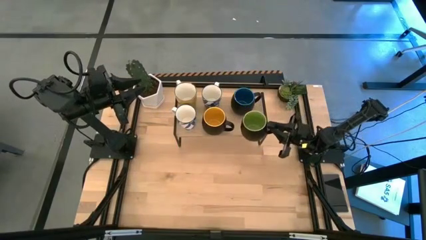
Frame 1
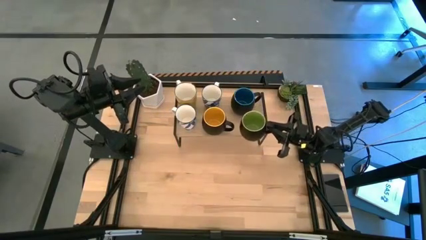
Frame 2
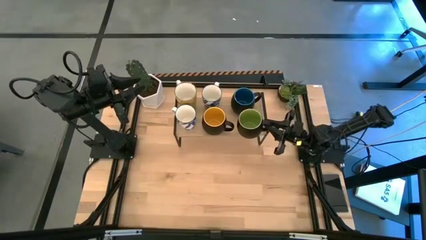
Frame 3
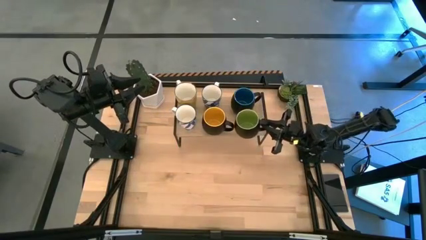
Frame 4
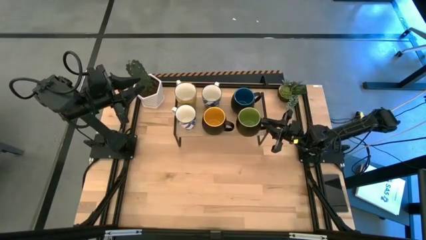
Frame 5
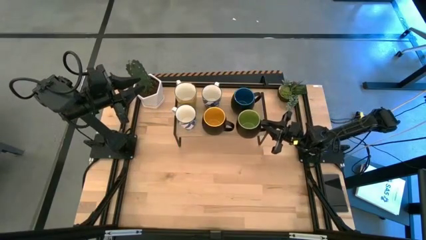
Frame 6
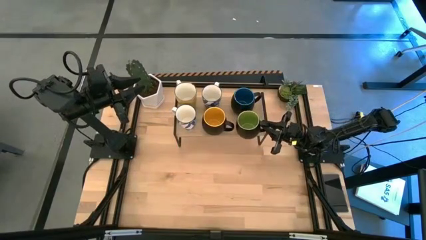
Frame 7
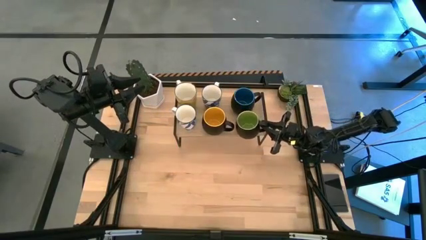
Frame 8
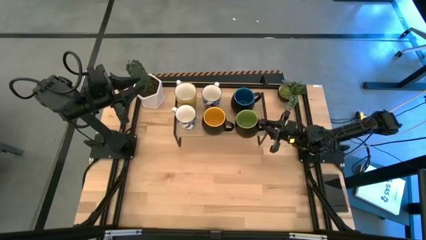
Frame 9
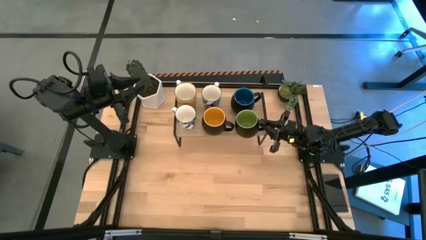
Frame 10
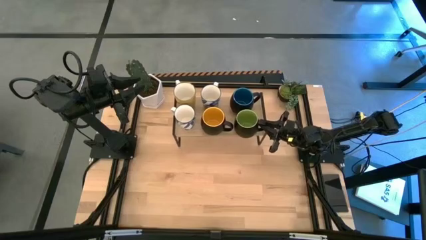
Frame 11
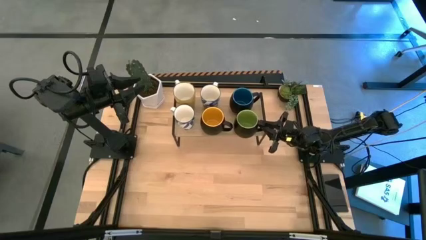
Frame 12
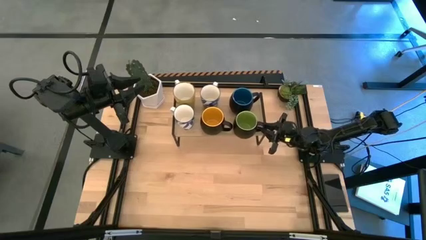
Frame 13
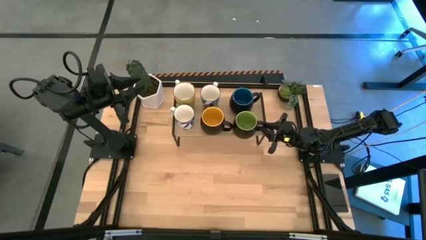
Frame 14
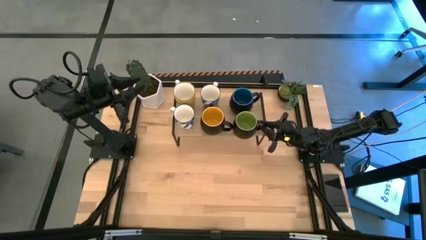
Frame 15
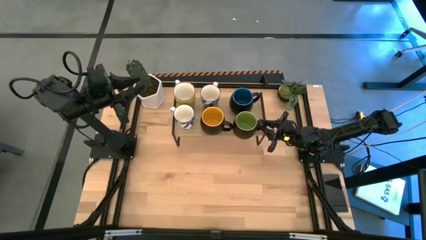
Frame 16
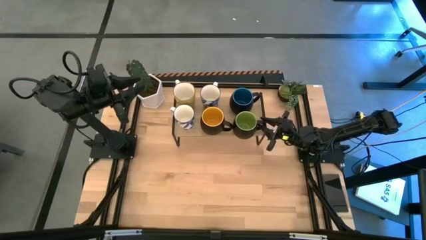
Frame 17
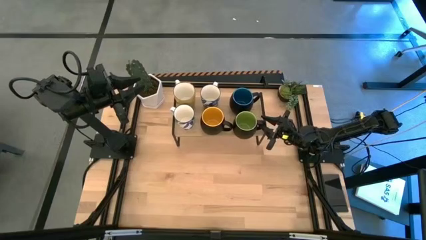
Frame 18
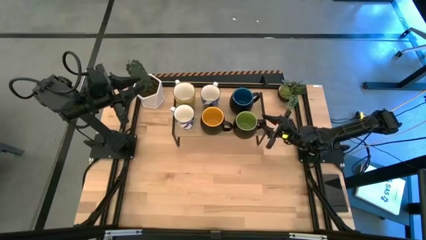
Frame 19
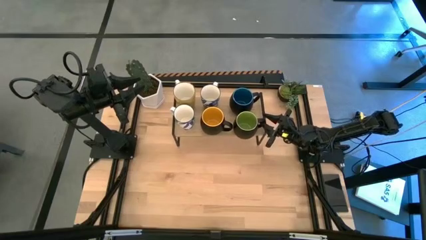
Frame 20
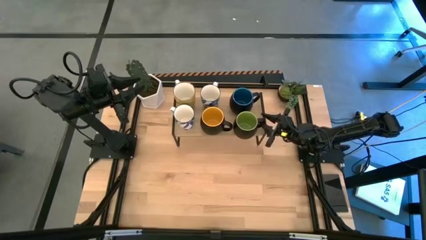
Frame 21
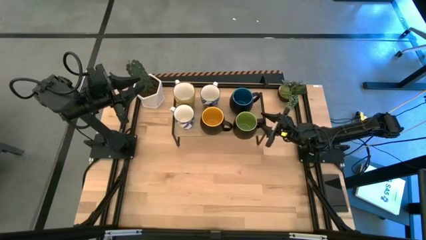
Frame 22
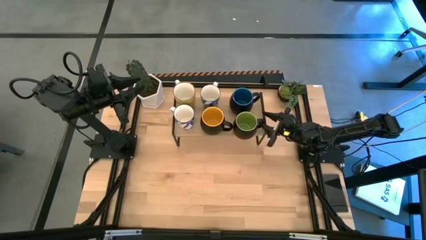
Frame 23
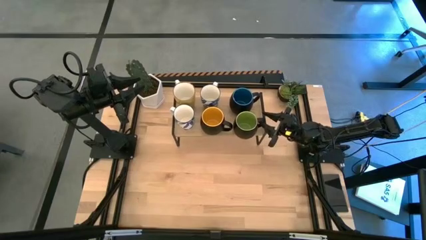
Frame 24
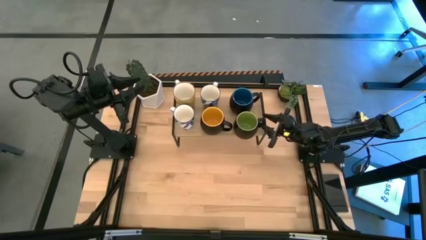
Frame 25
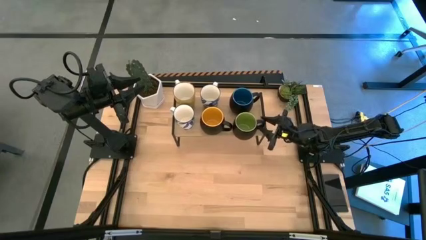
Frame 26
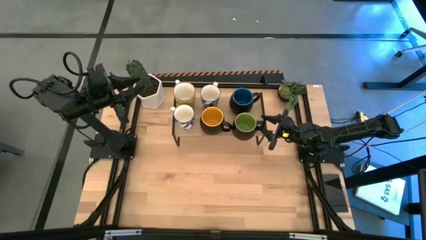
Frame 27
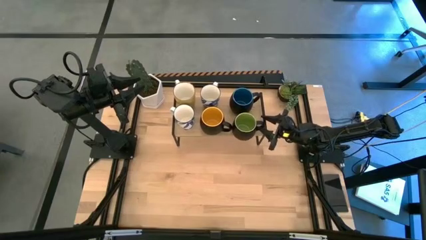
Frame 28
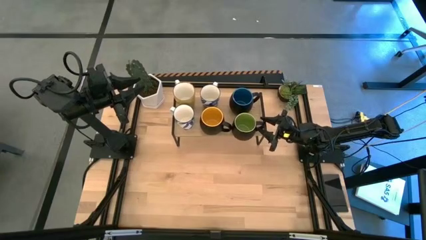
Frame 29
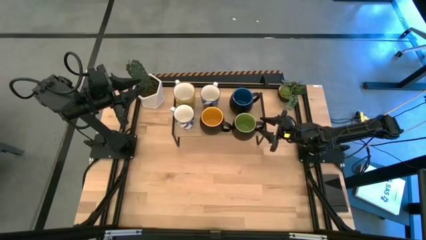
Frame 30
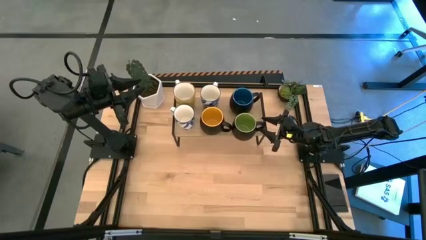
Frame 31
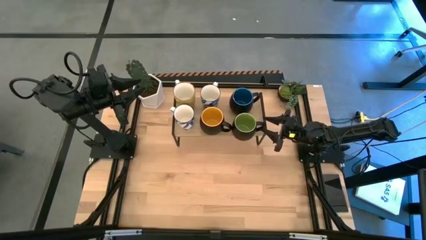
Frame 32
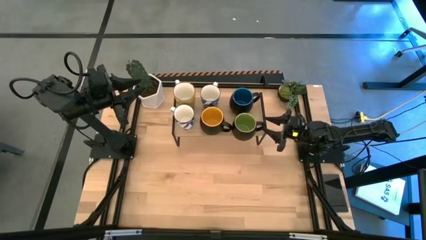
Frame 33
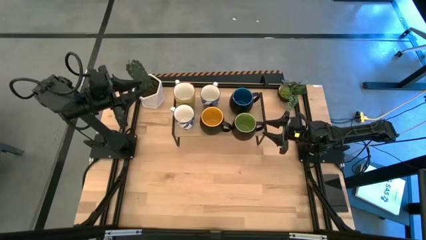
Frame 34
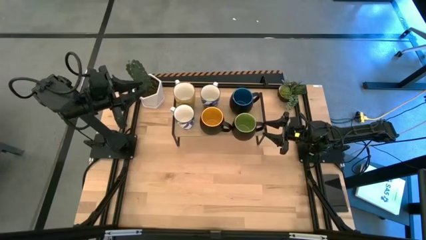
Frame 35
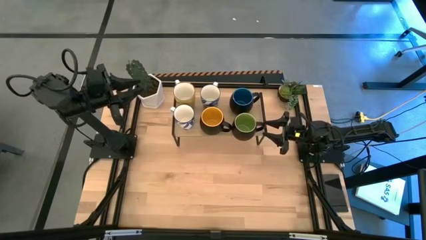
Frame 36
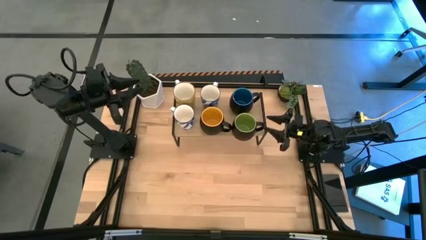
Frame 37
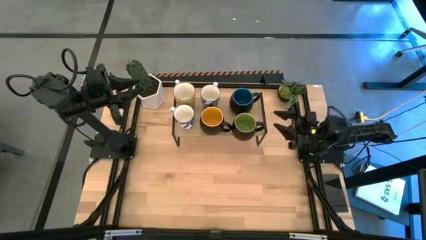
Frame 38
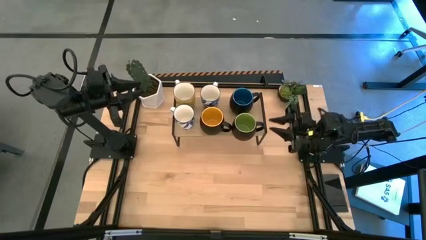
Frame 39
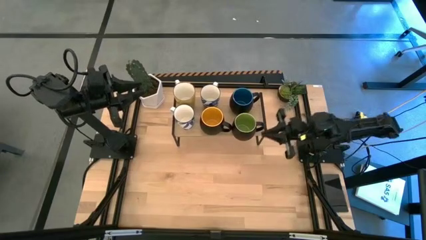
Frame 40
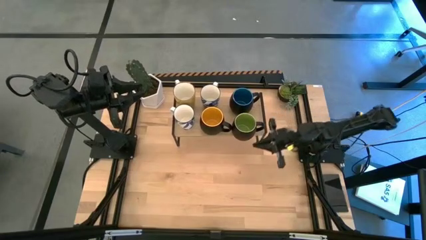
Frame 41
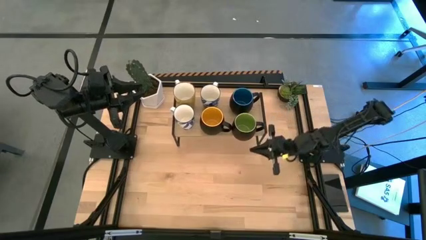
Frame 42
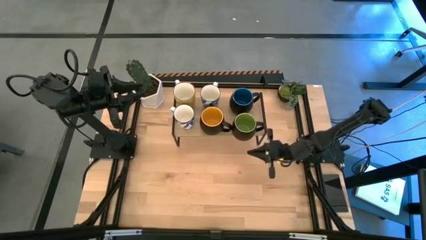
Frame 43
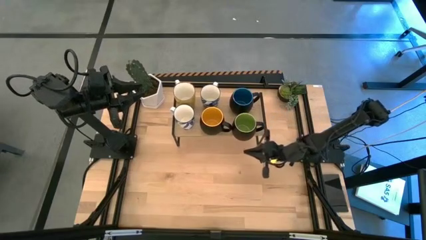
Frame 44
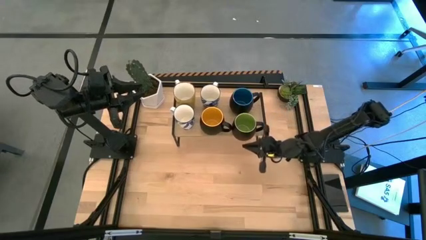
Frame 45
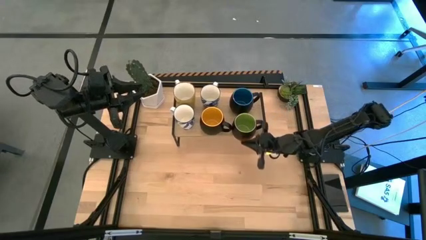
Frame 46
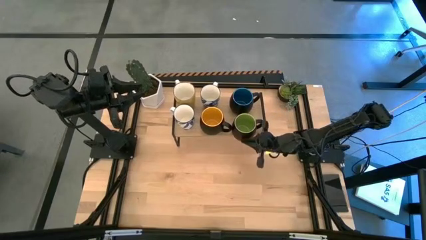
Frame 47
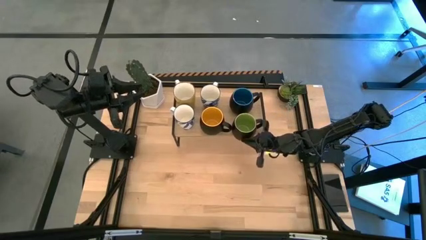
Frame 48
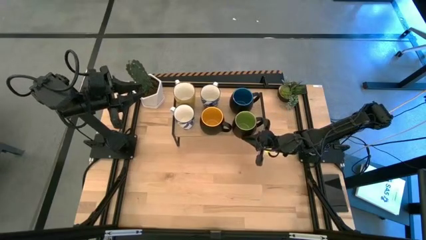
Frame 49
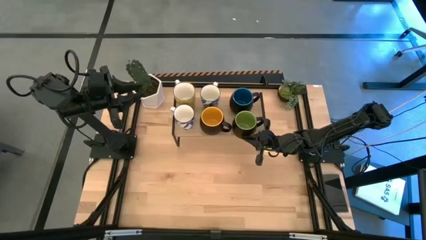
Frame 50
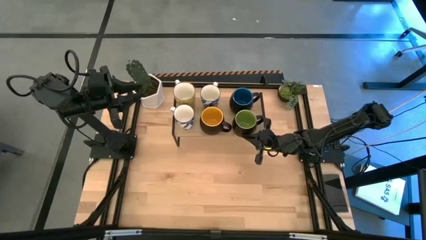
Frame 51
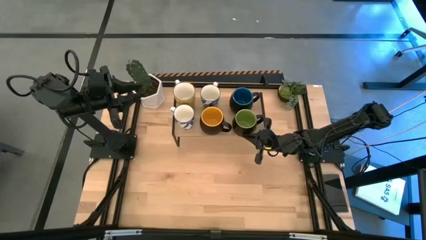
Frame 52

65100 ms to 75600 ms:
Task: Place coffee mugs
Put the black and green cup on the shelf aligned with the other black and blue cup

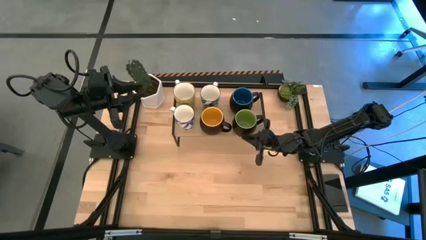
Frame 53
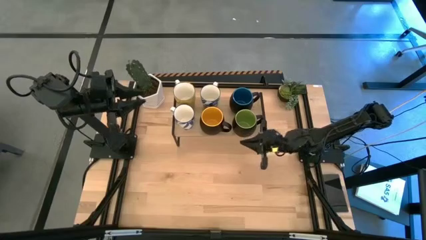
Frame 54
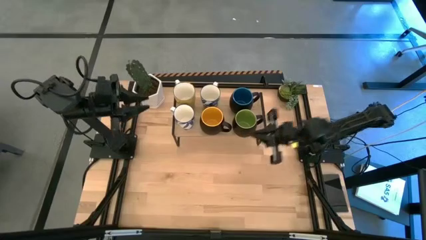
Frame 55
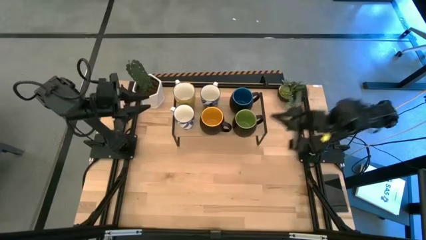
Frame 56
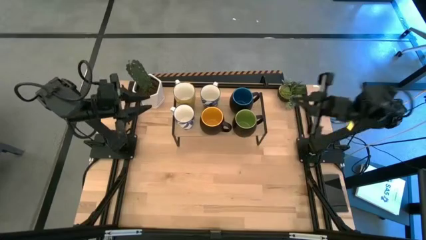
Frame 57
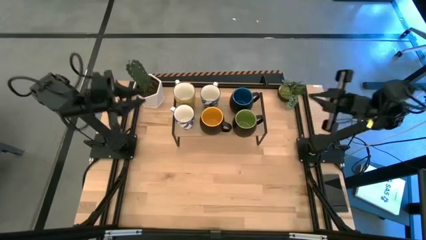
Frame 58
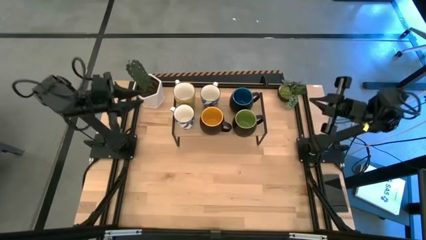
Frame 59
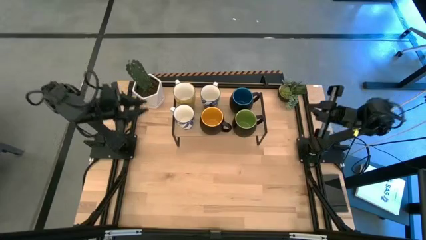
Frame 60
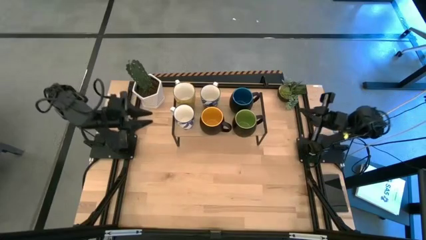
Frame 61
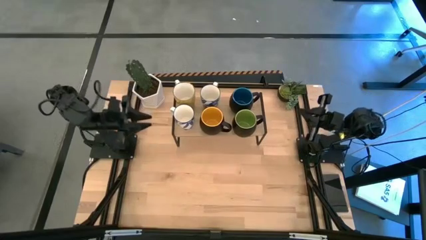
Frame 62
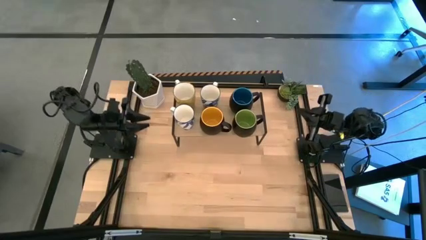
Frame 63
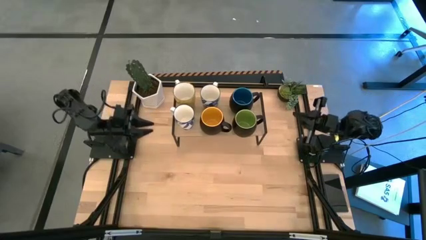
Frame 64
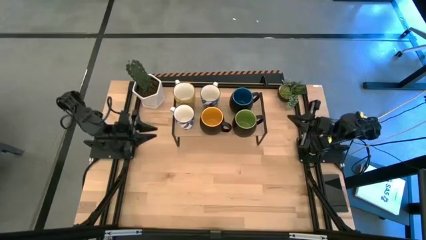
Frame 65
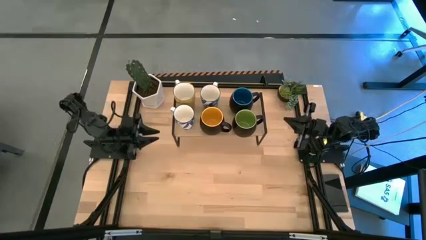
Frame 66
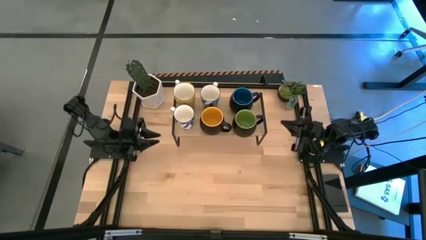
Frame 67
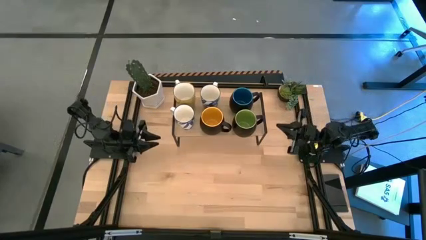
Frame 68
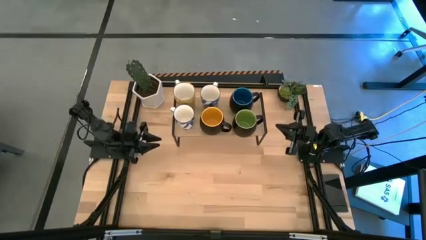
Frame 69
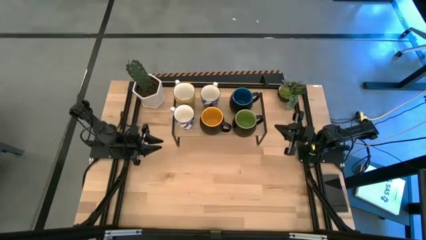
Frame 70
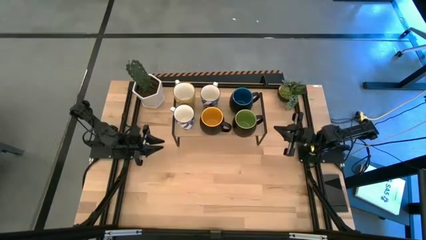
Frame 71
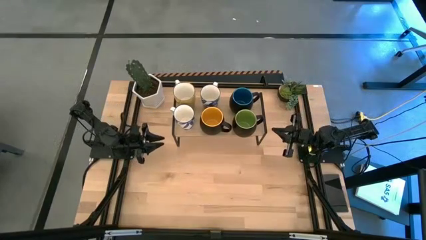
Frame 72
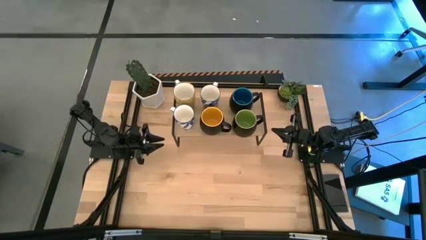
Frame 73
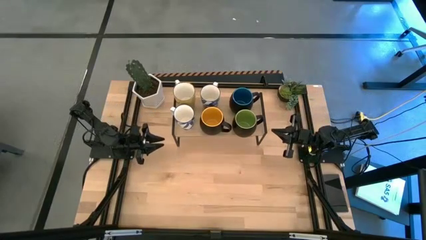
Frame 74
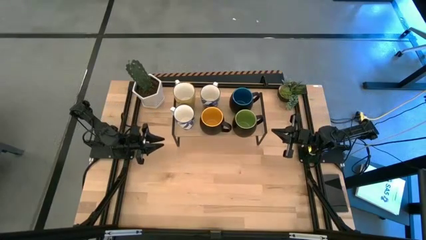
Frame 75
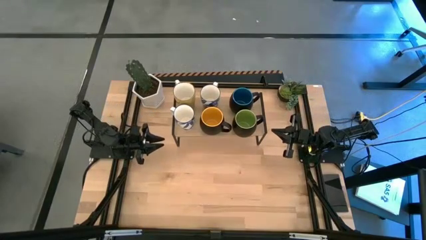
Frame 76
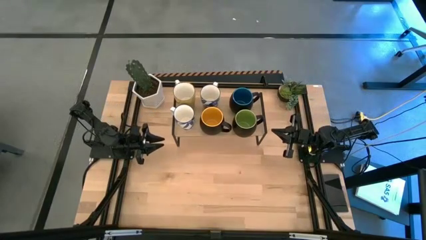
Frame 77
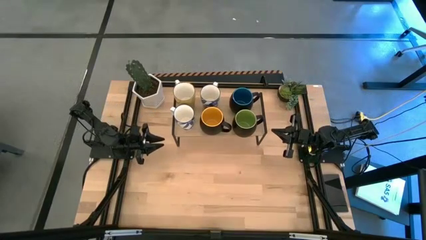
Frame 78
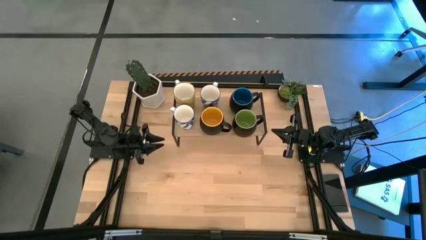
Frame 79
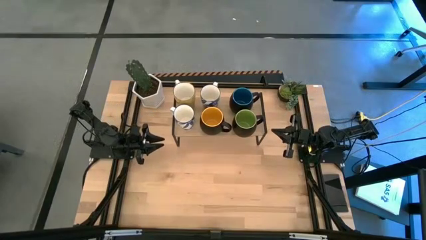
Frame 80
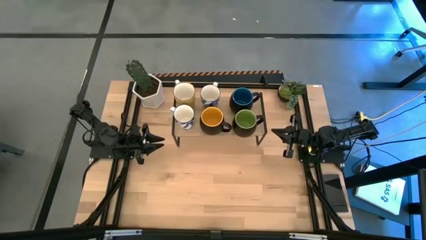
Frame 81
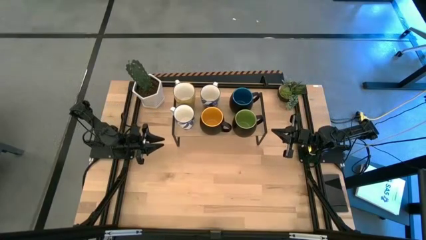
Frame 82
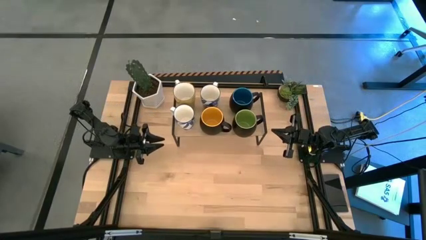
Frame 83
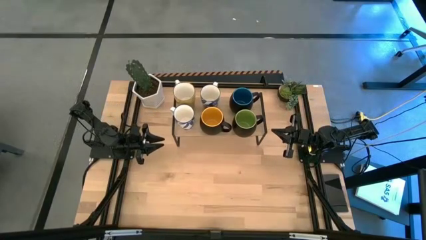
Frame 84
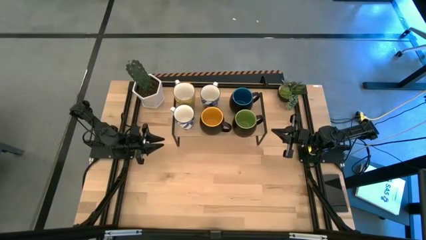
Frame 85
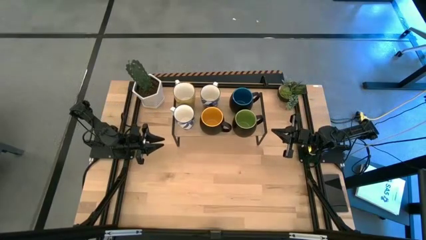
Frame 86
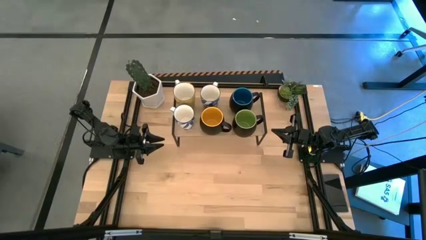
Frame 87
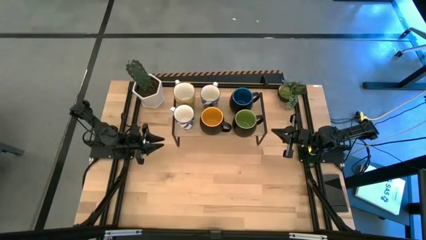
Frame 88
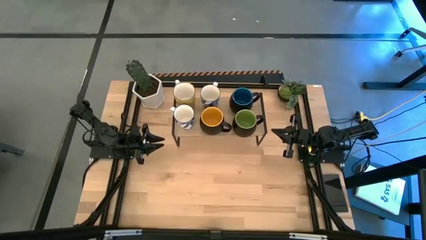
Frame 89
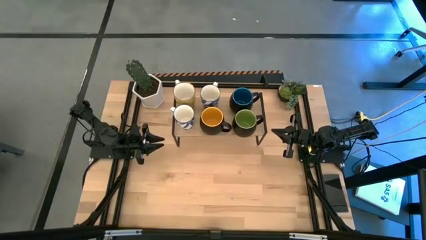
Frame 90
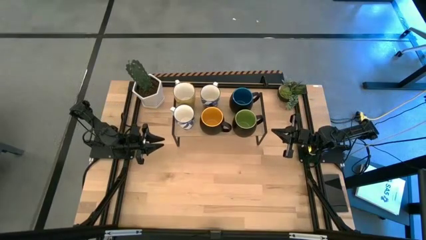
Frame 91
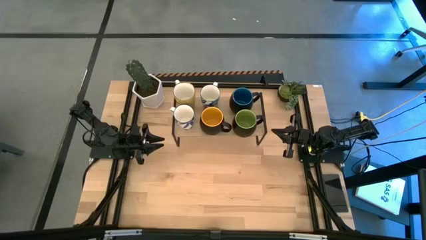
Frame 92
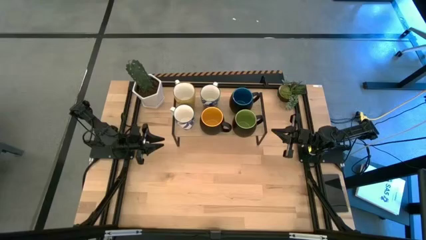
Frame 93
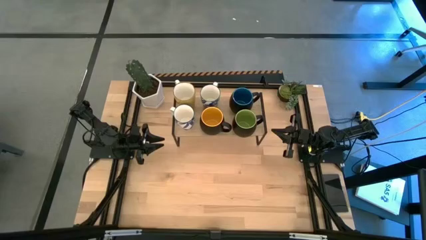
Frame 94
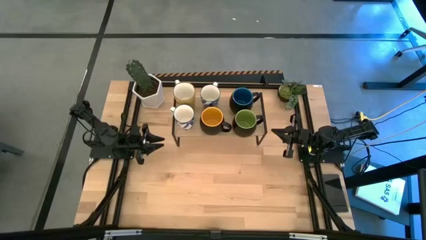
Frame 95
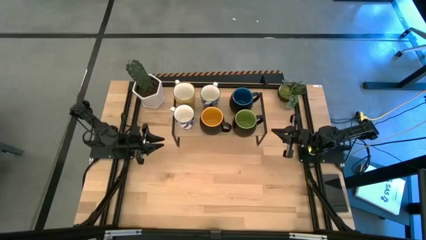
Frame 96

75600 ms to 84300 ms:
Return to Home Position
